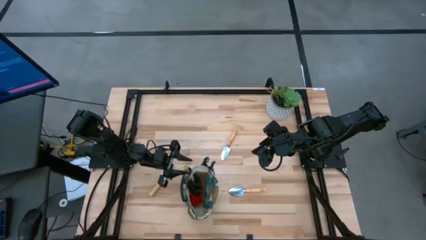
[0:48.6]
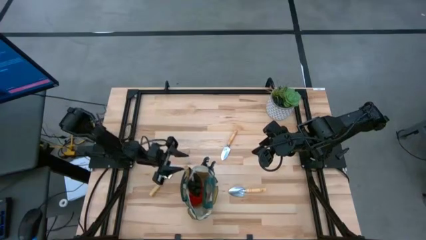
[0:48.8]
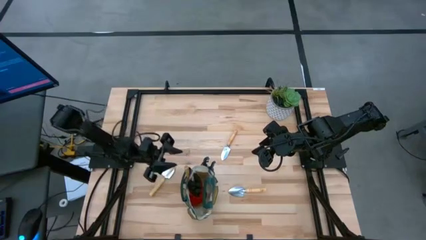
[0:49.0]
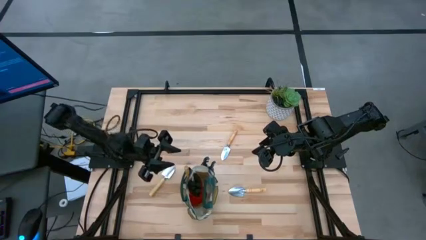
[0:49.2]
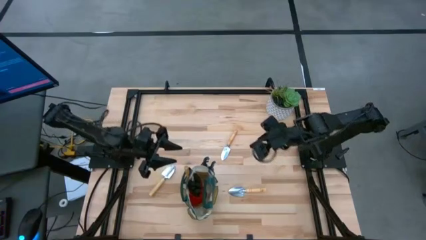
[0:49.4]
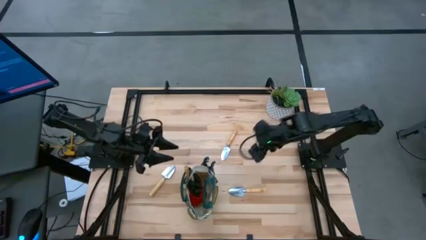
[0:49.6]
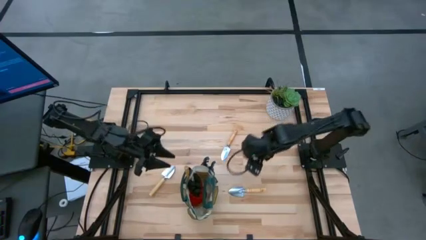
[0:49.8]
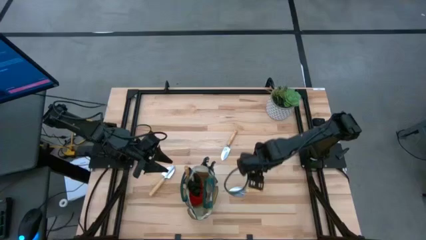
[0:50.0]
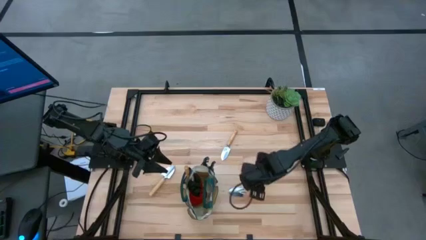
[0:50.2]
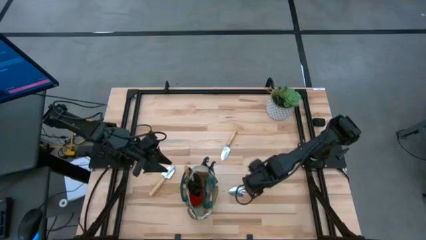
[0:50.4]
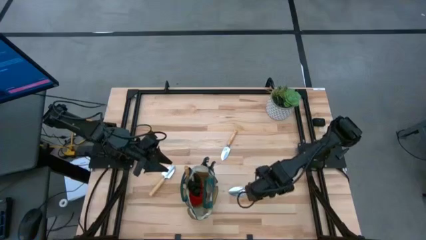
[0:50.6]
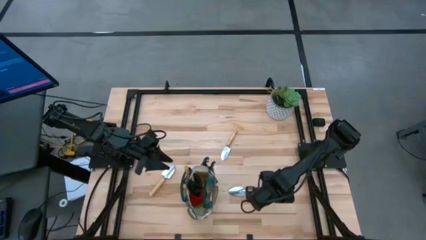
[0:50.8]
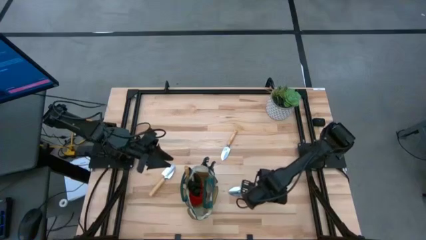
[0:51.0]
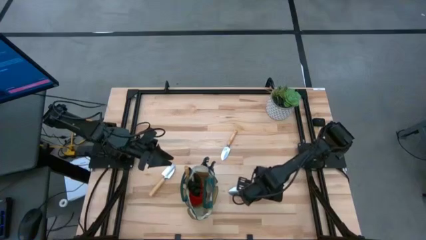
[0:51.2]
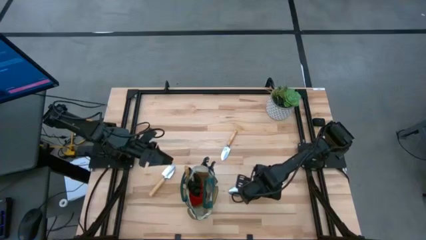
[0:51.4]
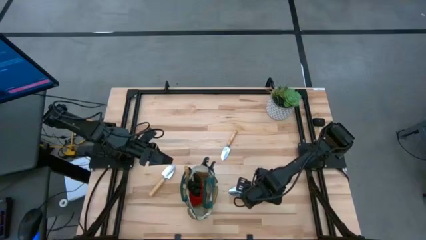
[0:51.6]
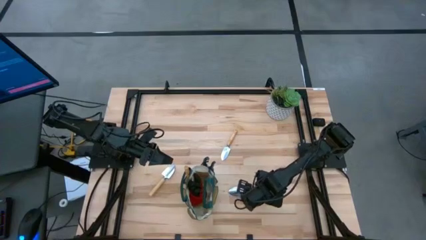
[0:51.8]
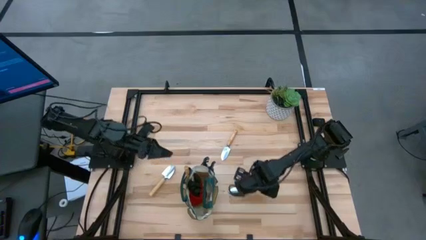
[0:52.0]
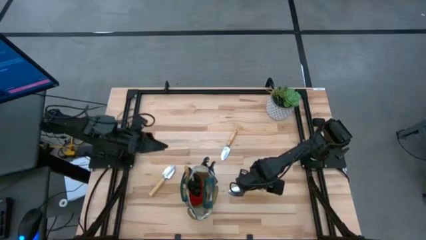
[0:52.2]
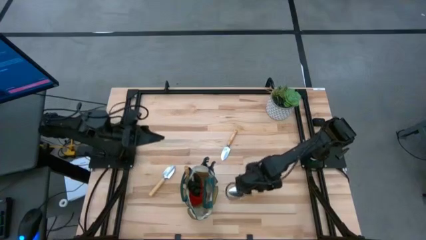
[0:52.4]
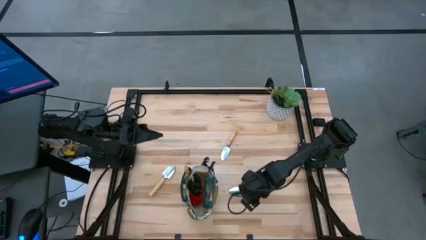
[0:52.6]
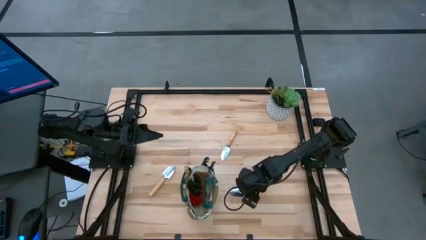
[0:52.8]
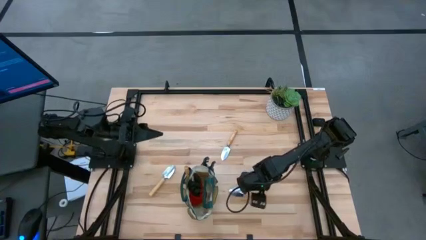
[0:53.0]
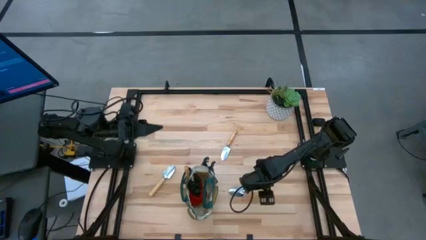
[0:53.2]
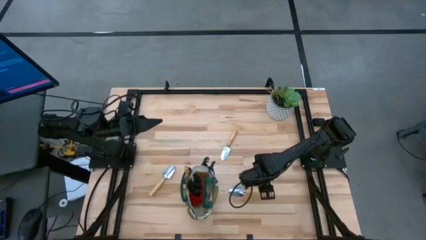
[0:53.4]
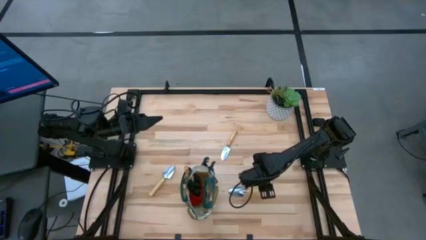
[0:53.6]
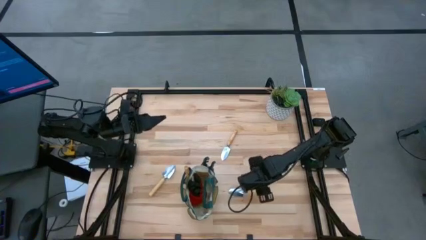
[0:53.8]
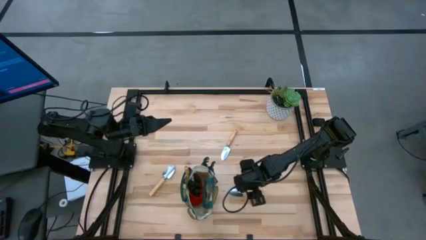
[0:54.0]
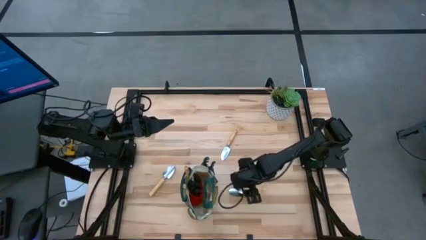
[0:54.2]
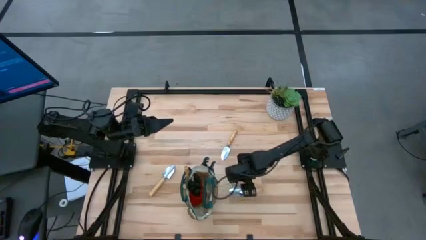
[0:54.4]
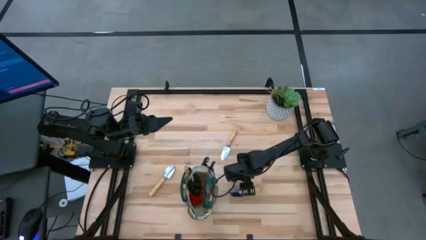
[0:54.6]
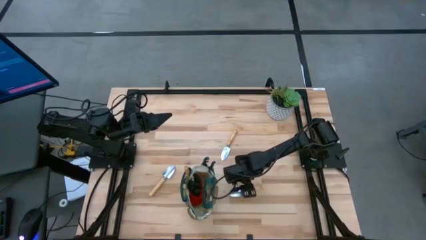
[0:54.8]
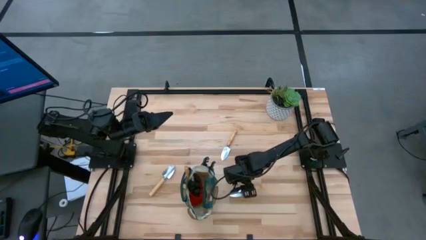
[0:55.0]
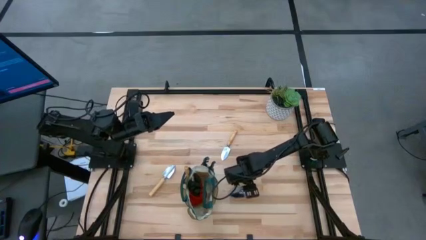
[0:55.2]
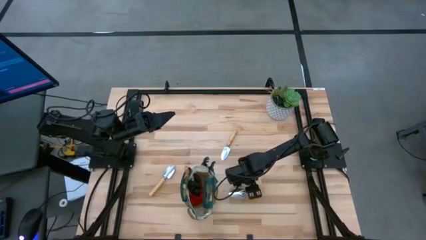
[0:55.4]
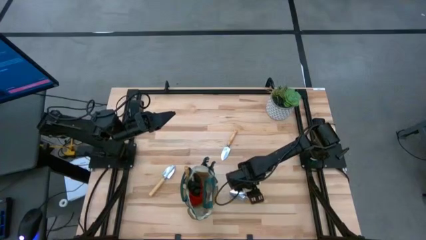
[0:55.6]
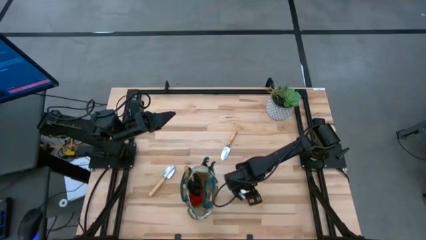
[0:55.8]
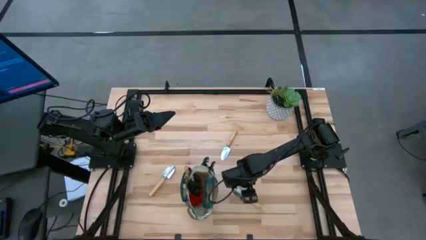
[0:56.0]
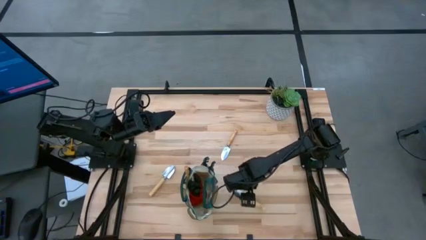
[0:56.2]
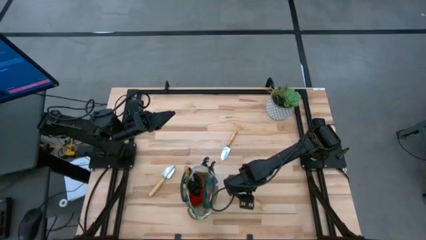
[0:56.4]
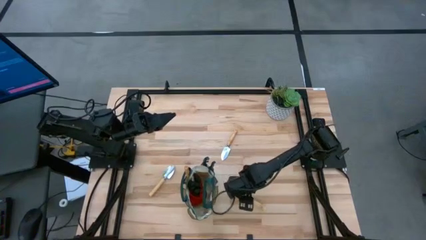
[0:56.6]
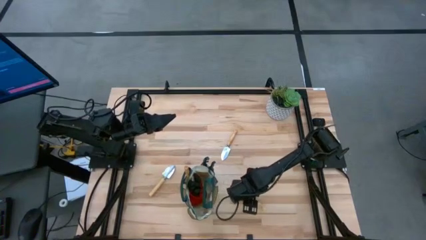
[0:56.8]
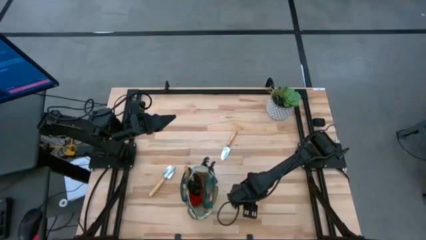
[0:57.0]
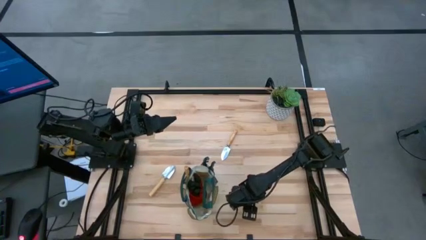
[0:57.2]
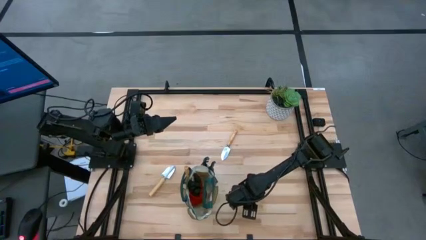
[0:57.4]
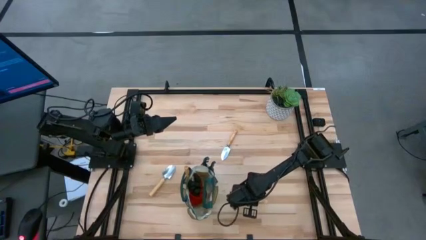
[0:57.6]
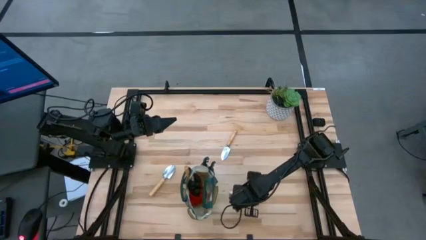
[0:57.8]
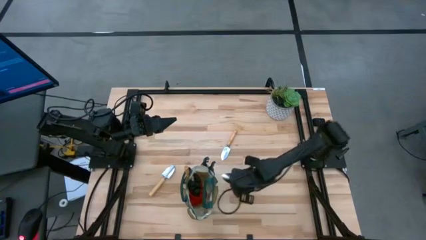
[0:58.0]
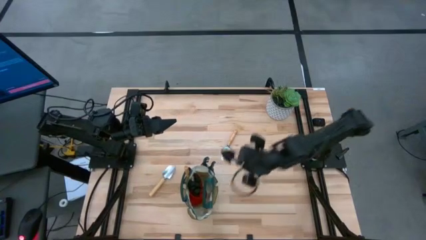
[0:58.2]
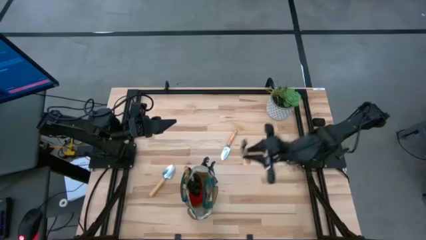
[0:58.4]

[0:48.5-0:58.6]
Task: Pick & Place Garden tools in Gardening bag
Put the brown trowel into the gardening bag
